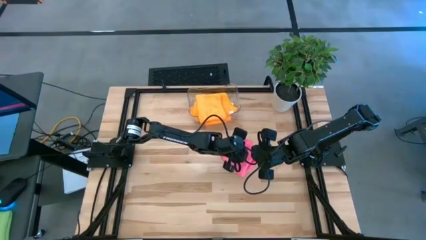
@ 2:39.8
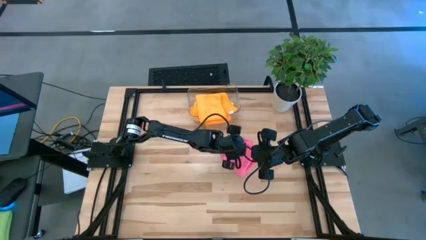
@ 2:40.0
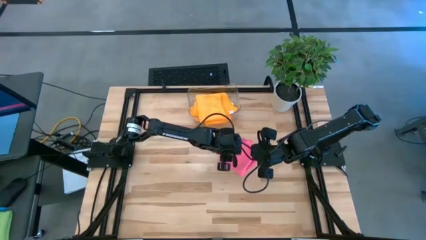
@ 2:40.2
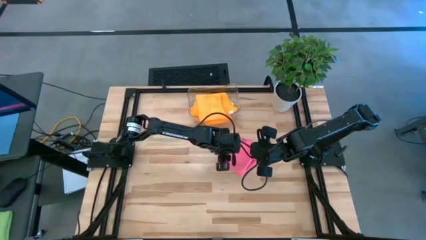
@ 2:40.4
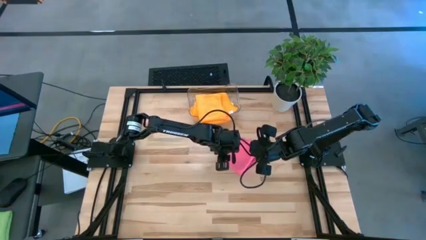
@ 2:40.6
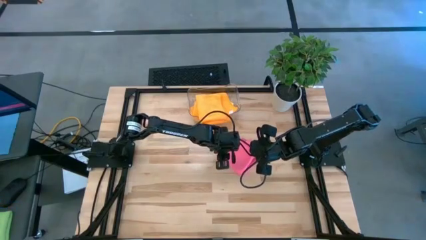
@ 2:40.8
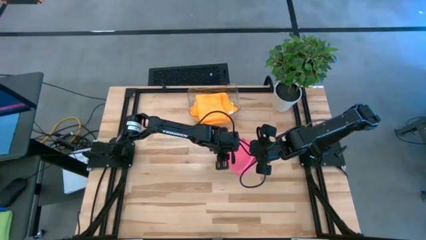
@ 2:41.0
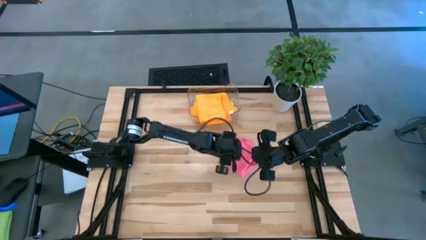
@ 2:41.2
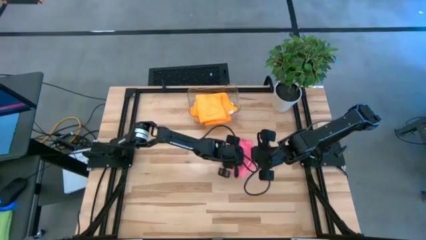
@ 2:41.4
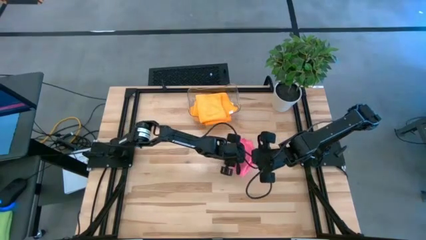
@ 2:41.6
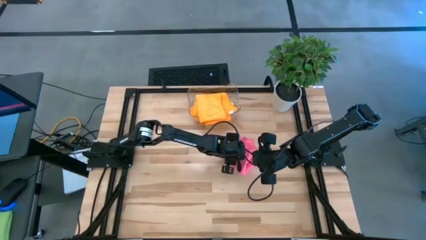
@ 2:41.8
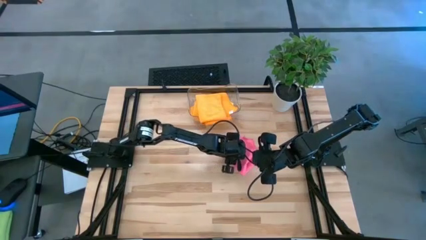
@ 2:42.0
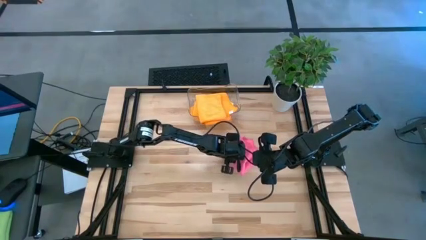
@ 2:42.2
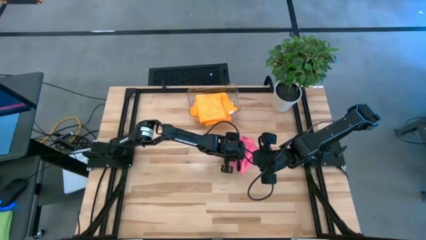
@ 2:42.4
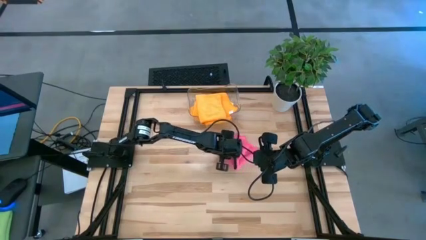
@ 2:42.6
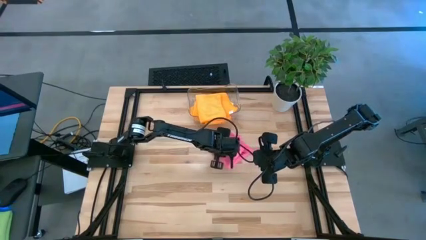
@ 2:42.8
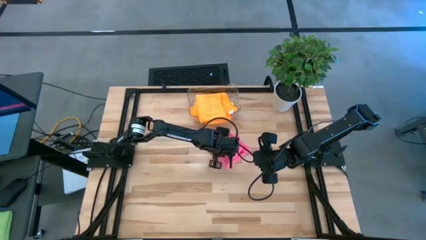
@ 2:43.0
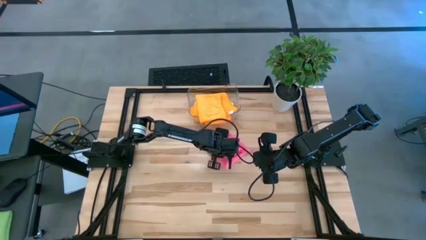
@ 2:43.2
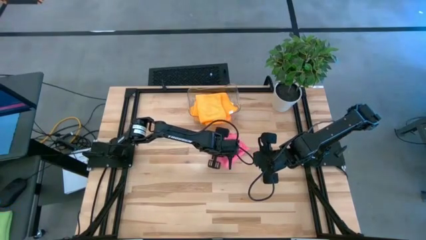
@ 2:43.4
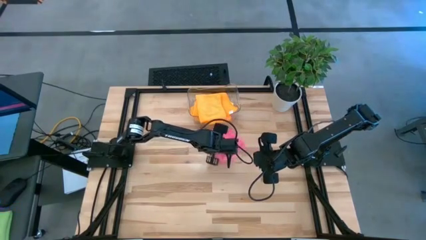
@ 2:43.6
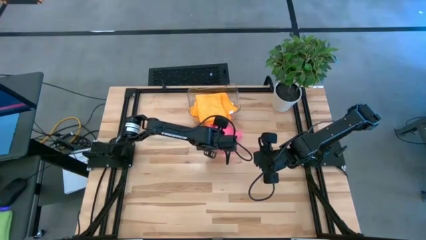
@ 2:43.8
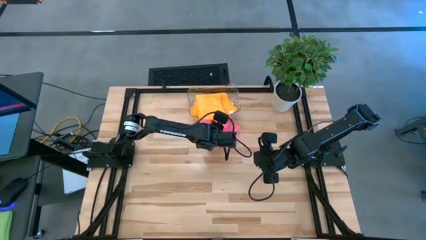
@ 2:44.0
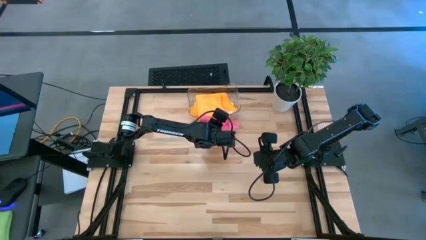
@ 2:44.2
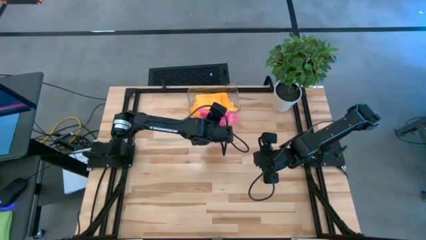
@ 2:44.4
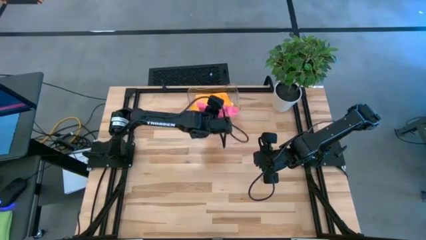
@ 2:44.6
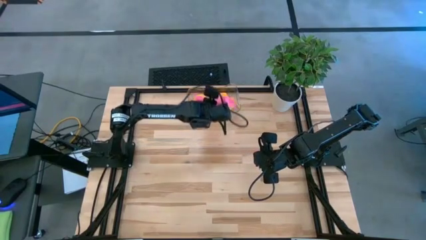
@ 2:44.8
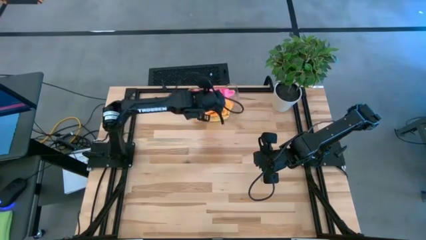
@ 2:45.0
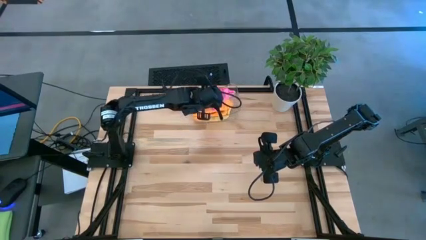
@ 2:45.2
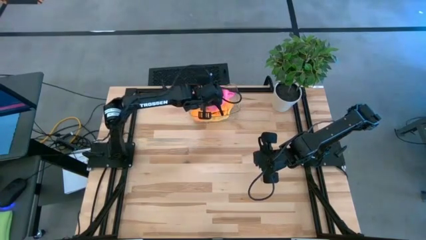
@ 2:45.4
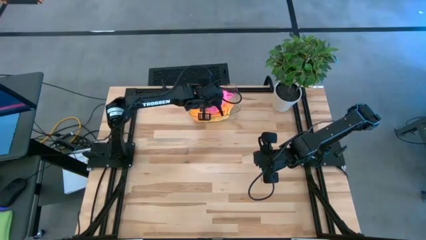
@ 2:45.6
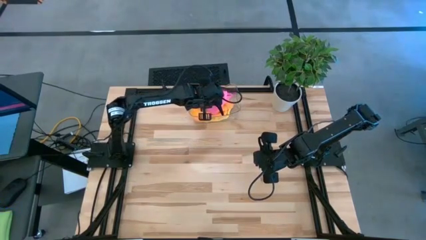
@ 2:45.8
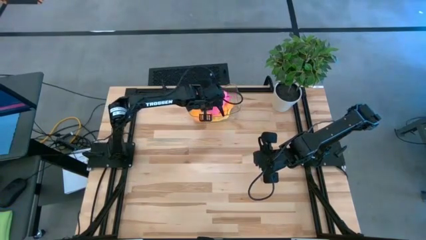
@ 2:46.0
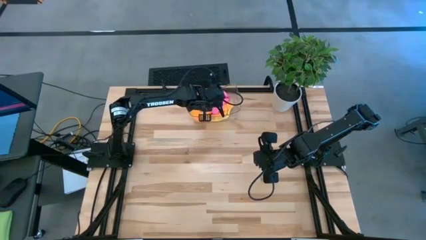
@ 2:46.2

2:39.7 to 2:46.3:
Task: Fold microfiber towels
Put the folded pink towel into the transparent bin

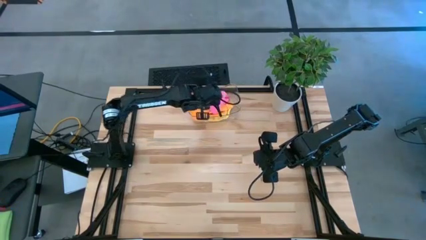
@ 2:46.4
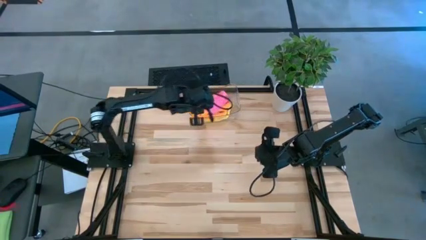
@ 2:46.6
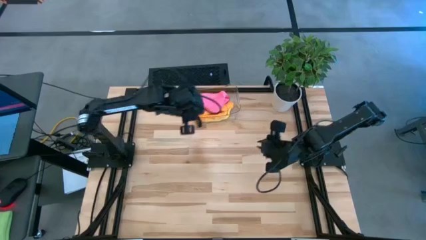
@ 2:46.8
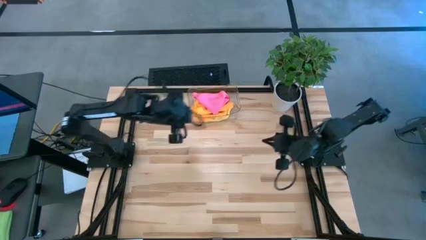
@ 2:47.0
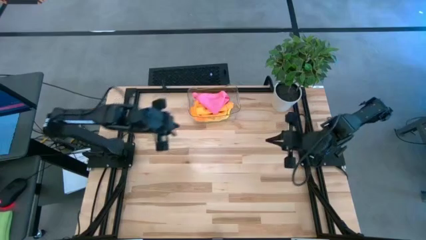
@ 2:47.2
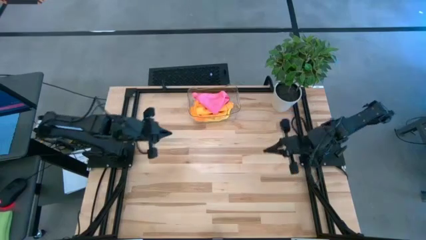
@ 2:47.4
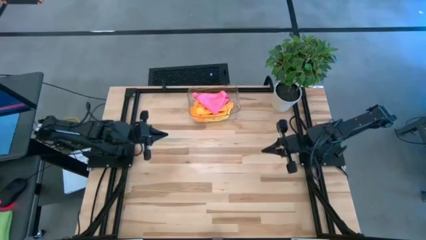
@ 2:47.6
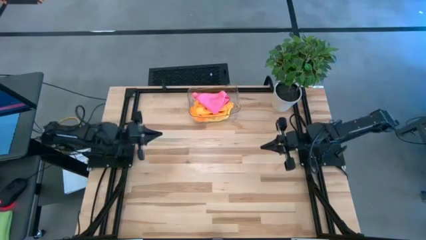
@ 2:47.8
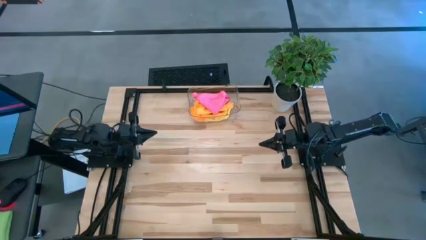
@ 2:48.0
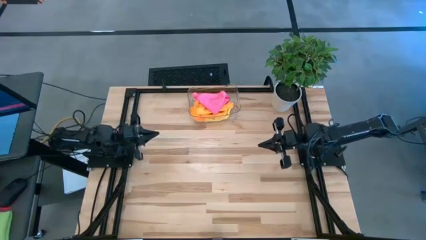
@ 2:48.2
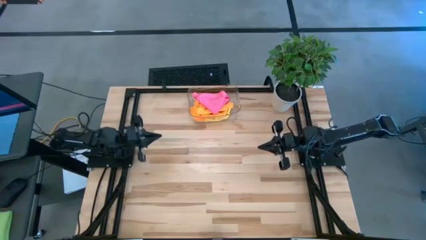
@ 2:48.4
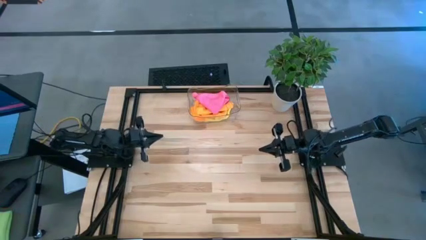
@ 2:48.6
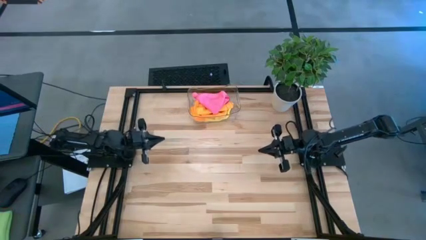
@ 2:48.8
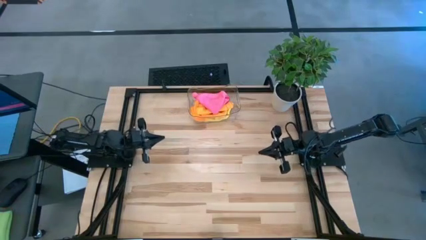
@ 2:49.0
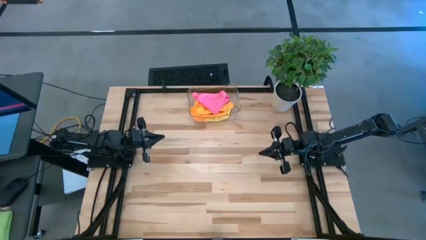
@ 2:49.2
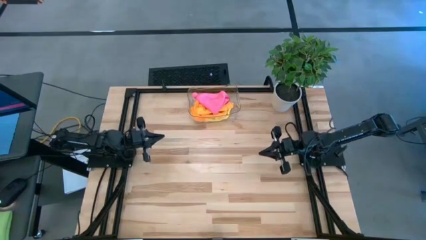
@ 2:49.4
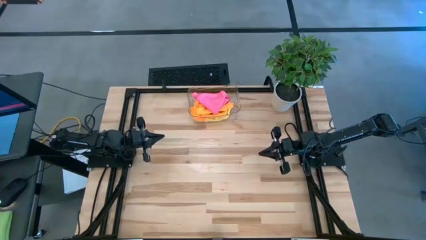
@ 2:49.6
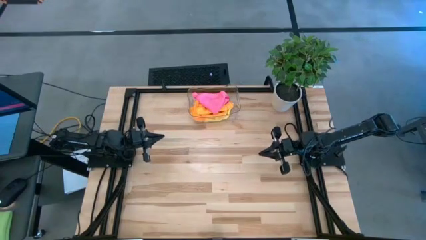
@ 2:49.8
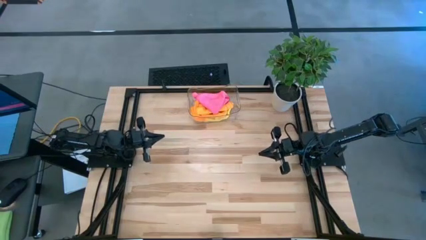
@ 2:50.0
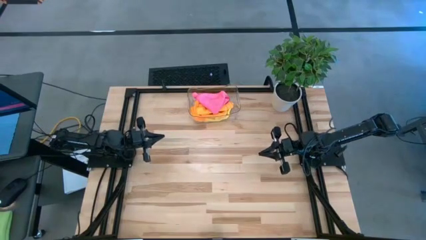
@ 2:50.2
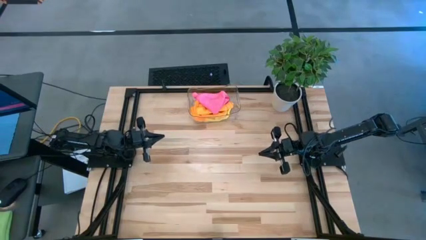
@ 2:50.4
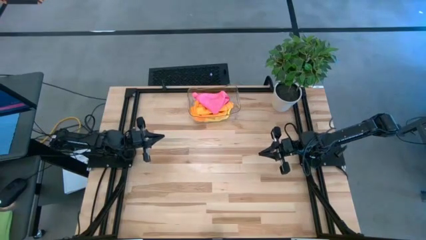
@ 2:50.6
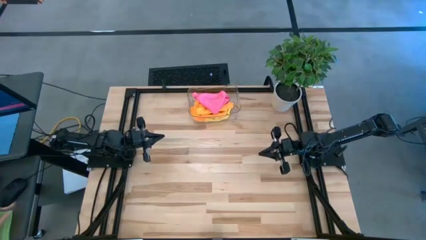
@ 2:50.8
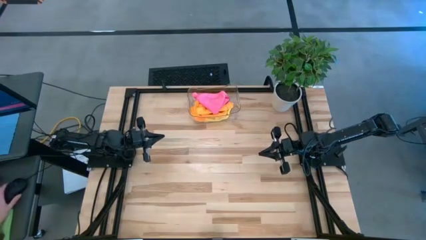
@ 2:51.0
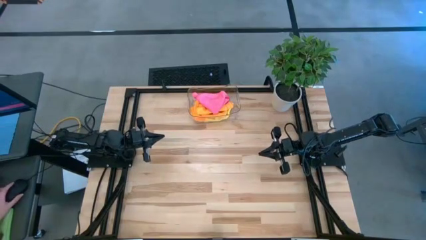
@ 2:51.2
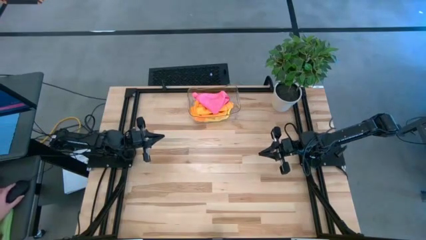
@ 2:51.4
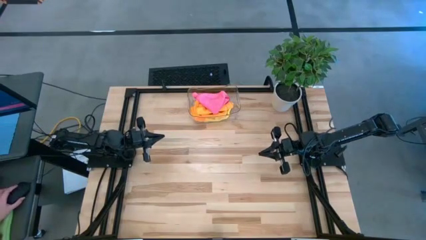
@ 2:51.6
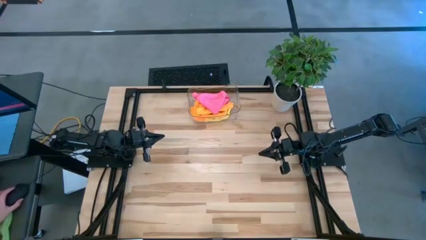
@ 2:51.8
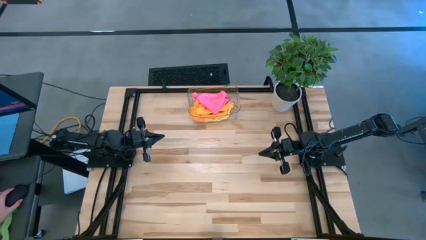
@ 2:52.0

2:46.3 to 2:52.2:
Return to Home Position

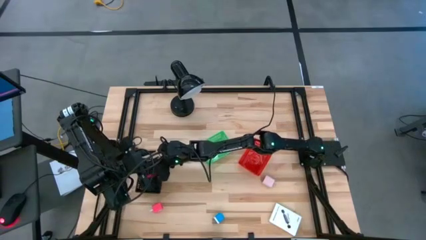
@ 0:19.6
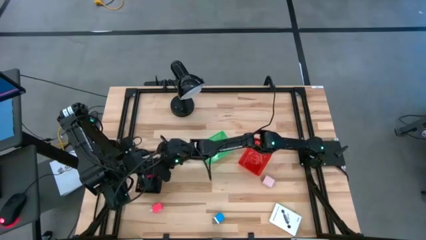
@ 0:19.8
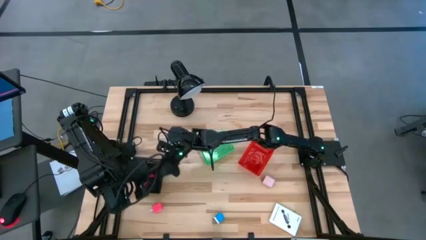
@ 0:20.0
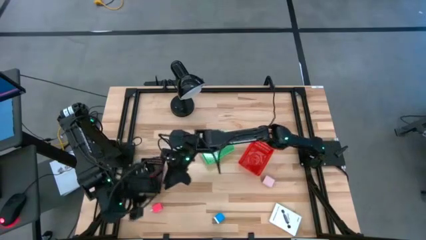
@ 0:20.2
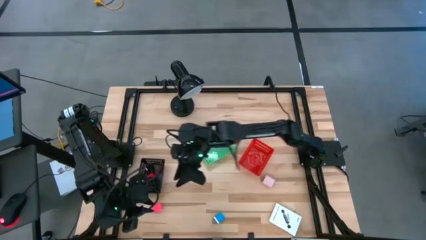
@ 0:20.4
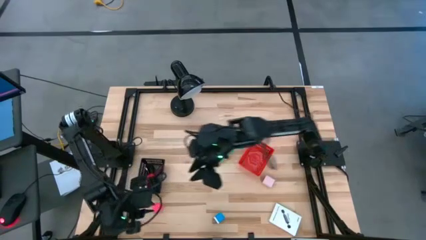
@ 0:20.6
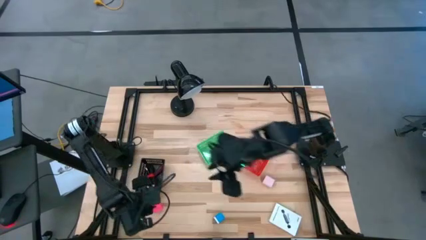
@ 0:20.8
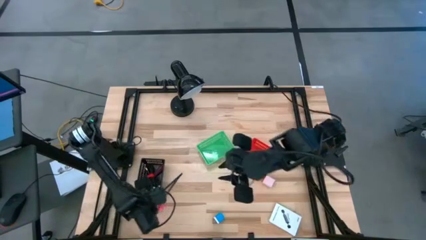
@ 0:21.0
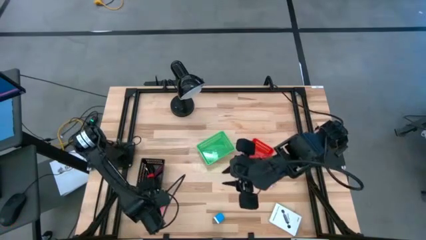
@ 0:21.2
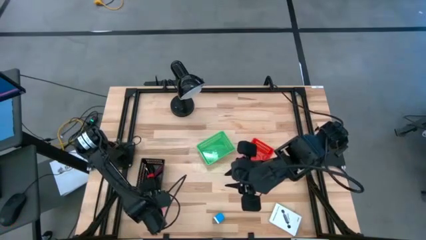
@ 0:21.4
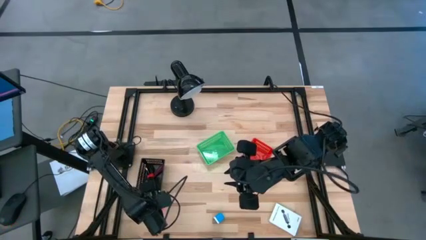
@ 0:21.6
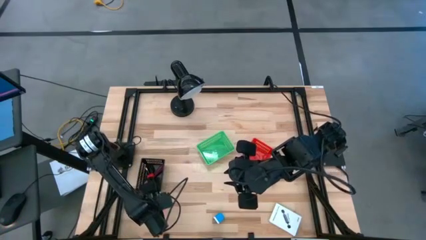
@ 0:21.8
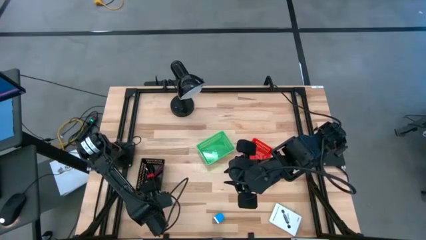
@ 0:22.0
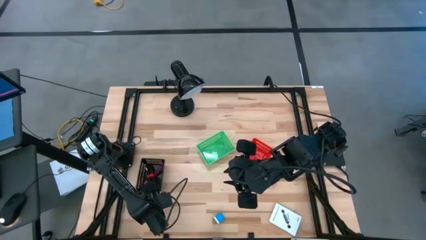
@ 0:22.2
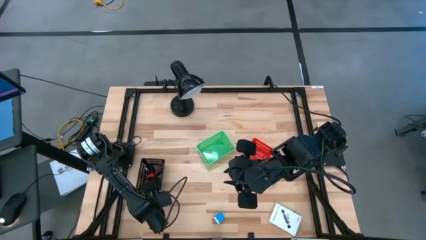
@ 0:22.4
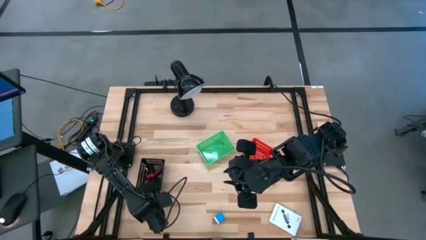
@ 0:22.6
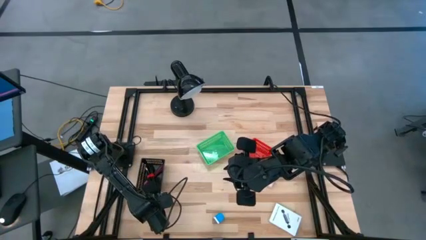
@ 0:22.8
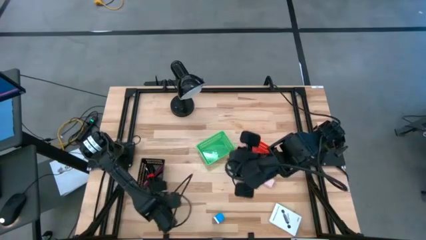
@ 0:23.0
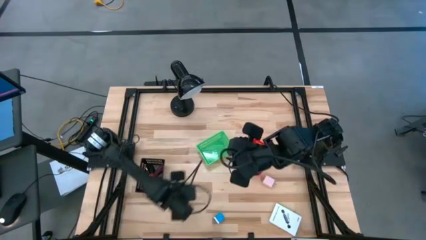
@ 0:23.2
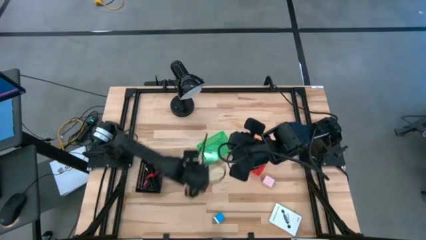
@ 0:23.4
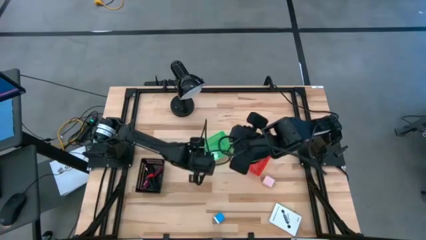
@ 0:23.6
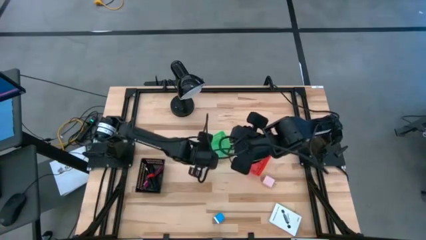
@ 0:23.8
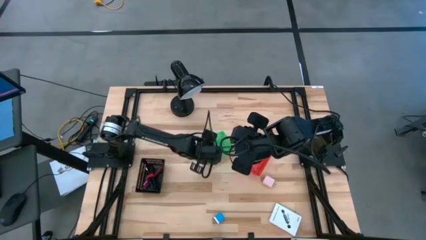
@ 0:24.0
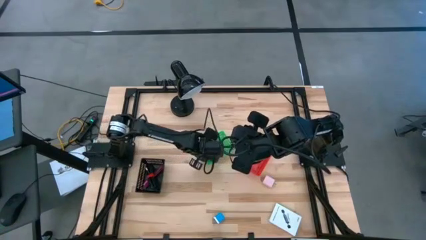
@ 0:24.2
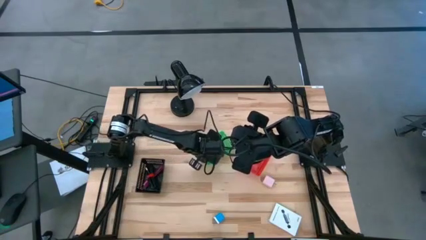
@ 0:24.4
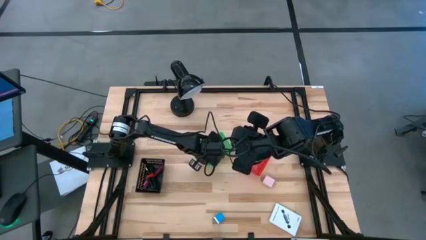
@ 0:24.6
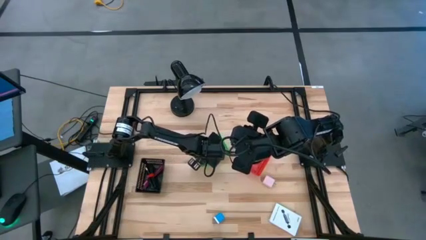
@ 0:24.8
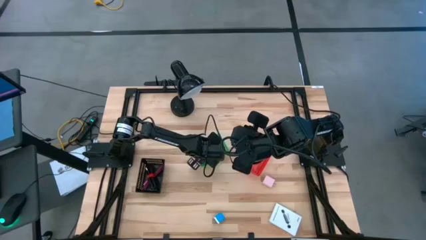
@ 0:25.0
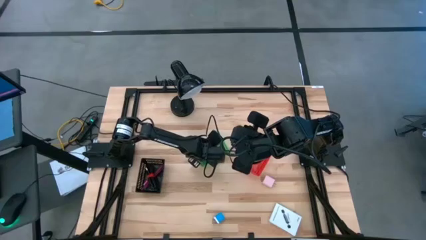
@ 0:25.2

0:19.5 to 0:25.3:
Task: Pick and place items into bin
Put the pink charger adapter into the green bin
